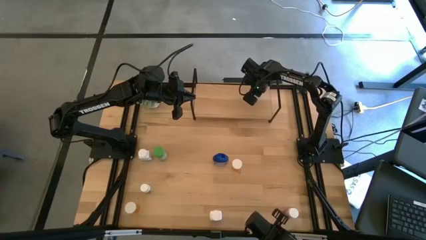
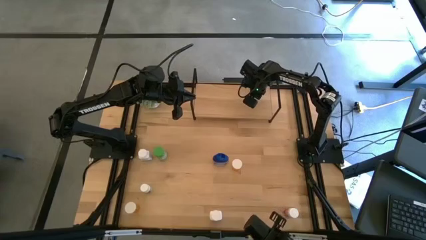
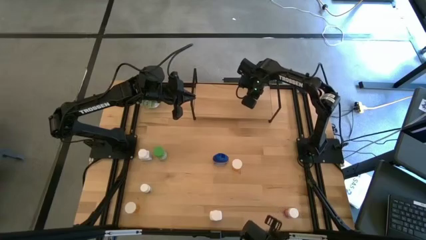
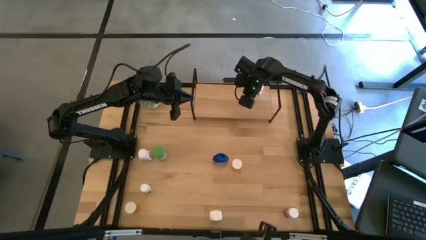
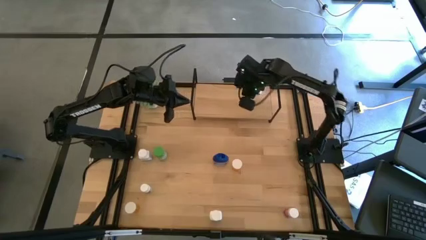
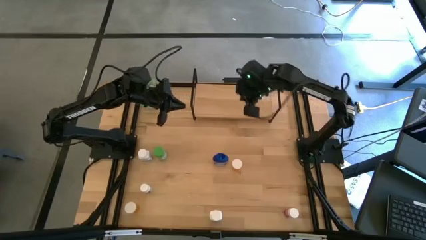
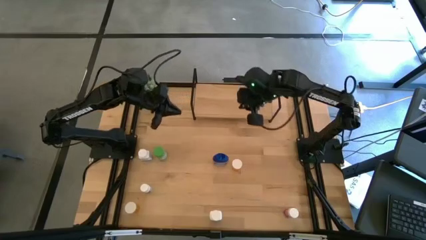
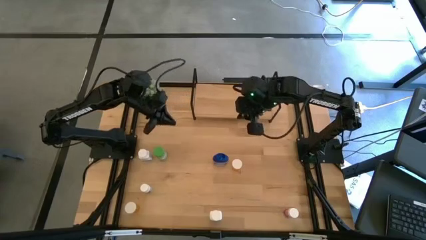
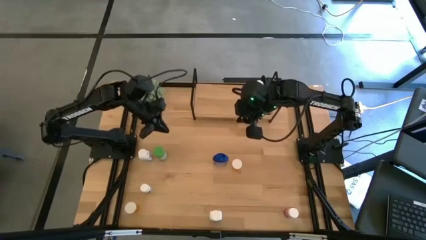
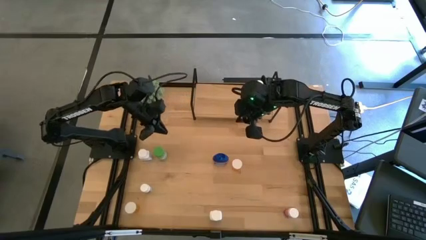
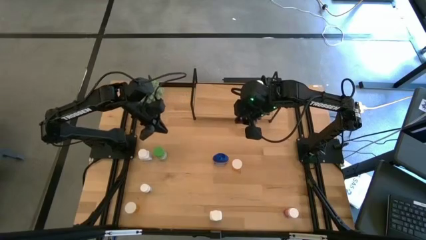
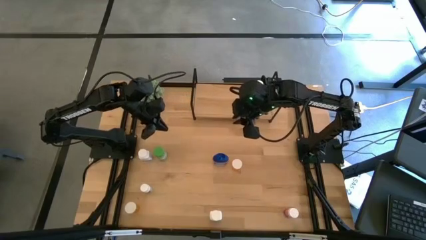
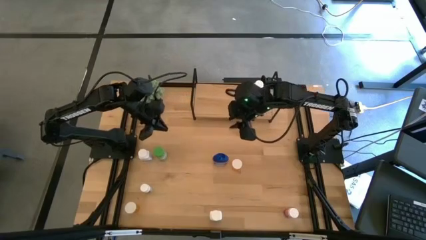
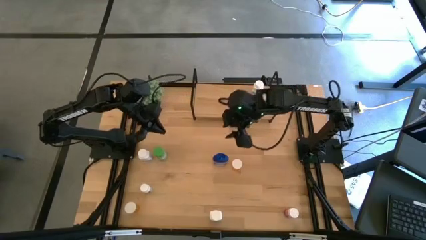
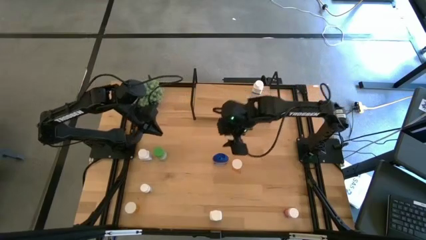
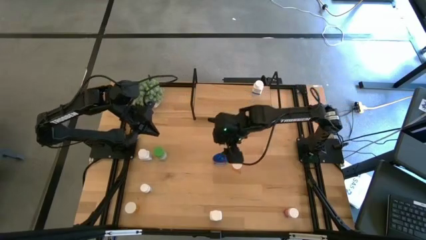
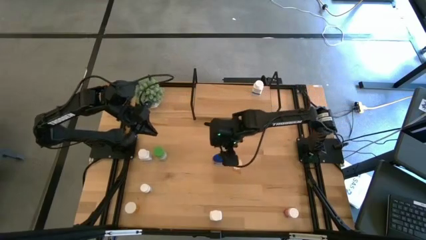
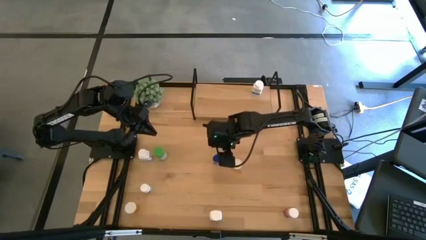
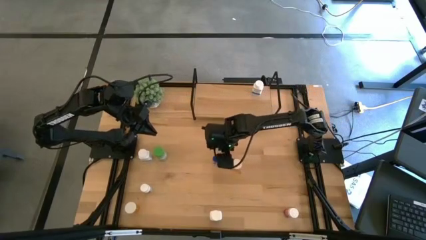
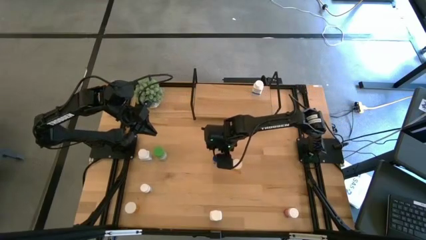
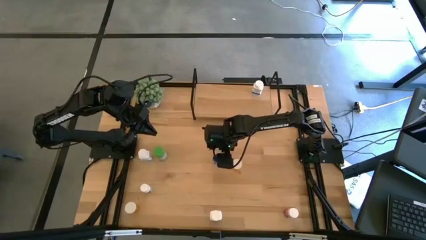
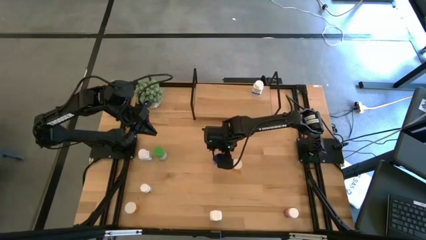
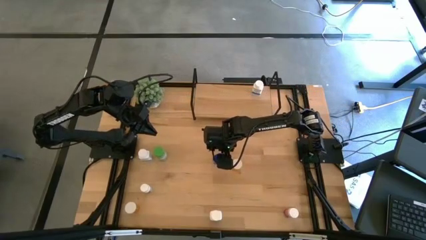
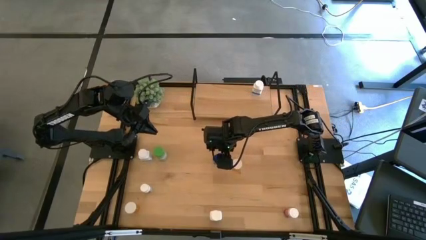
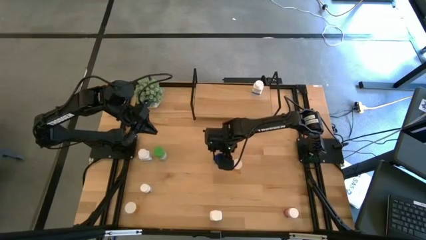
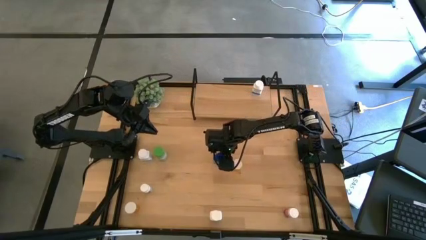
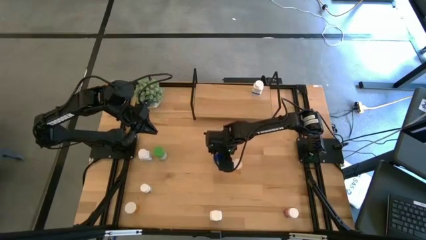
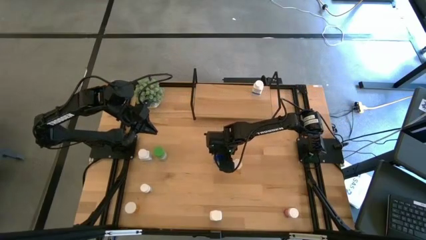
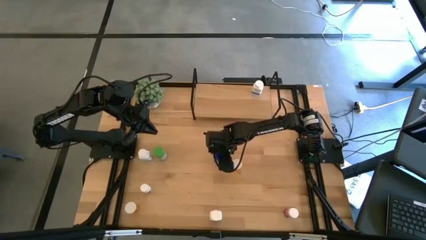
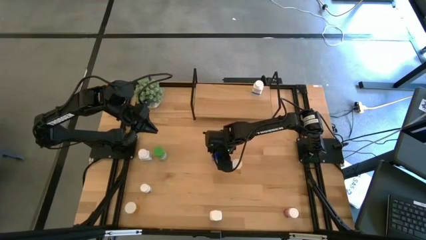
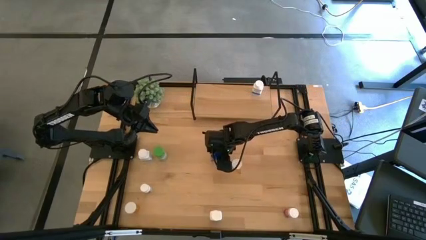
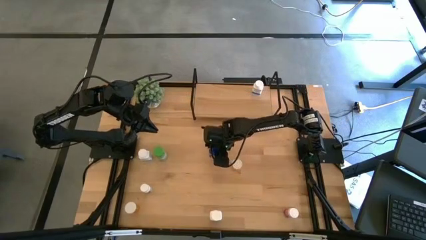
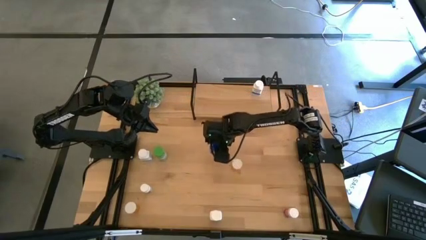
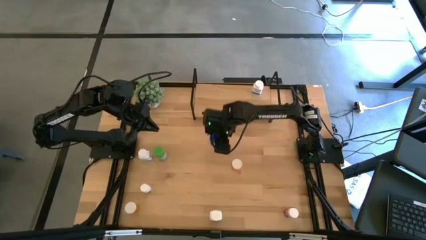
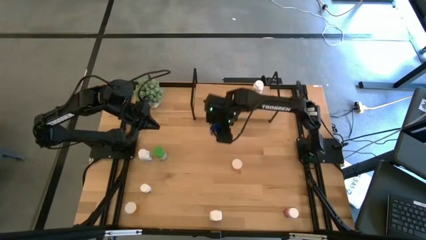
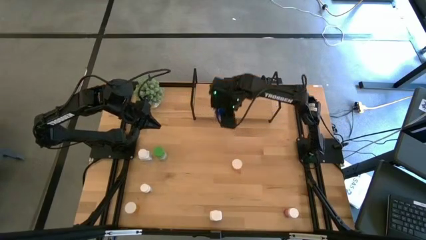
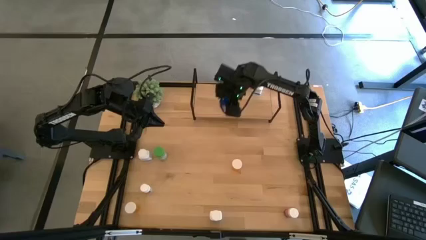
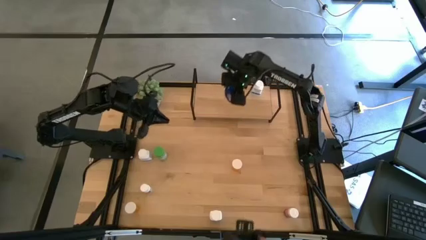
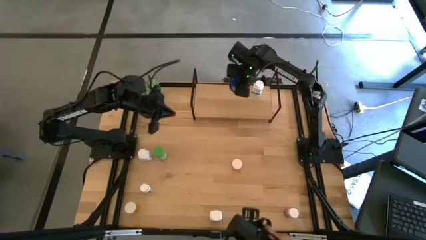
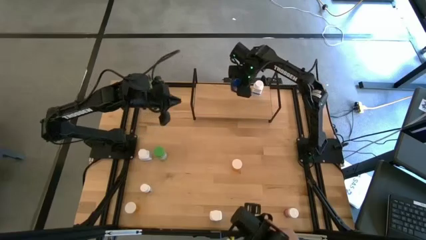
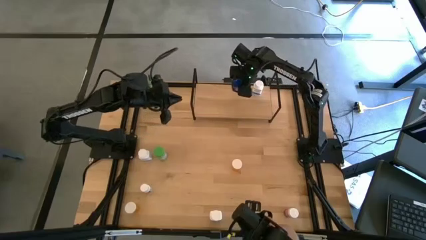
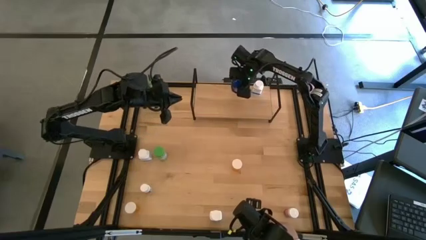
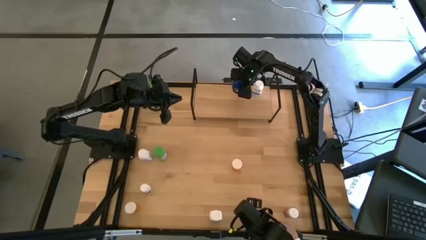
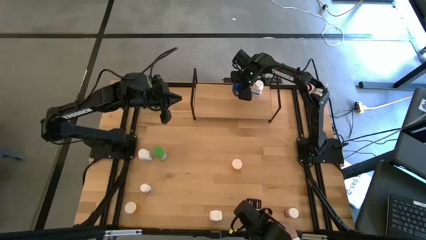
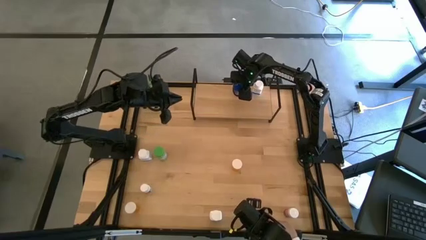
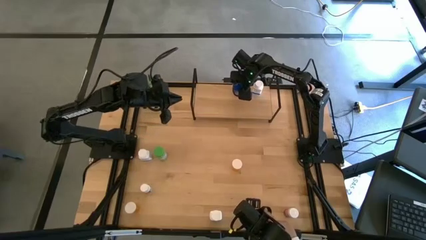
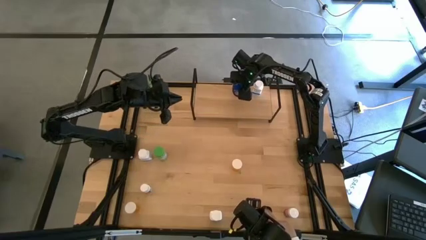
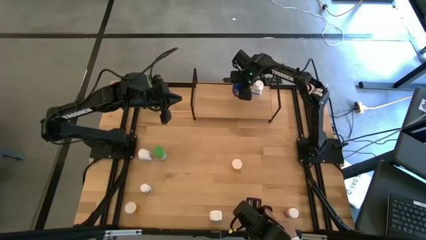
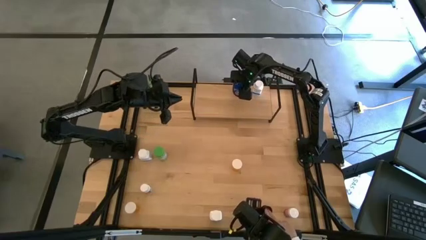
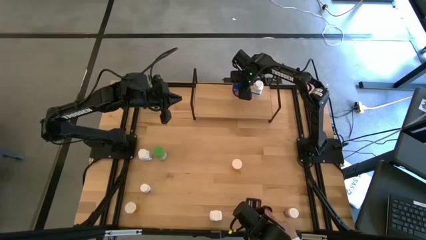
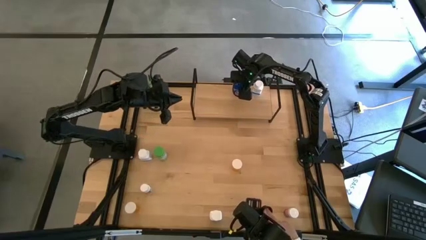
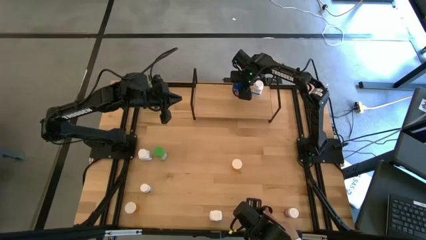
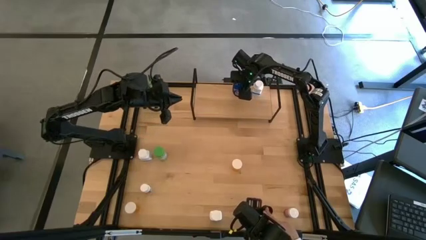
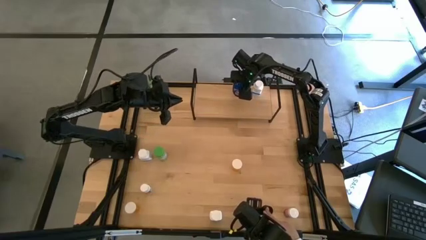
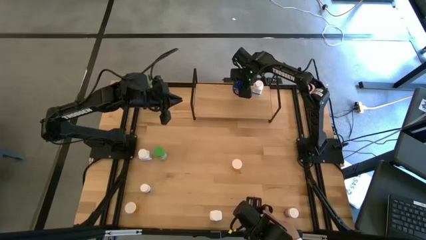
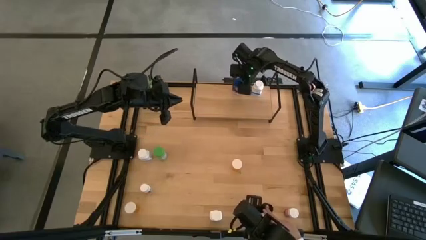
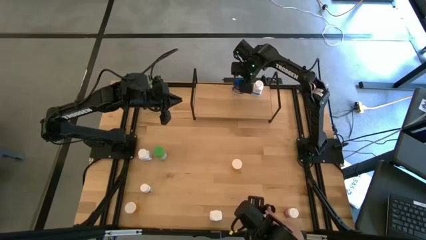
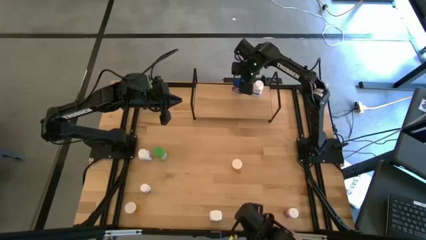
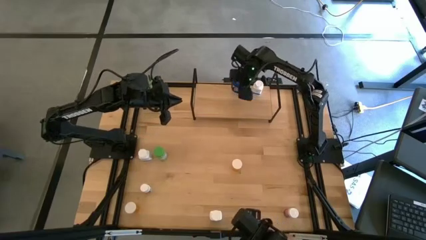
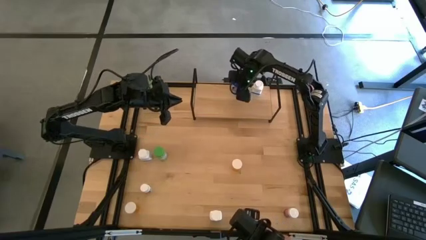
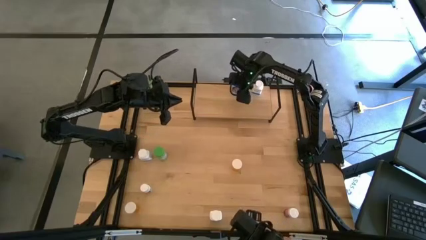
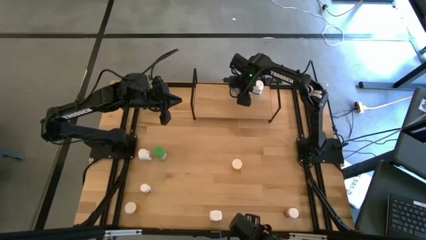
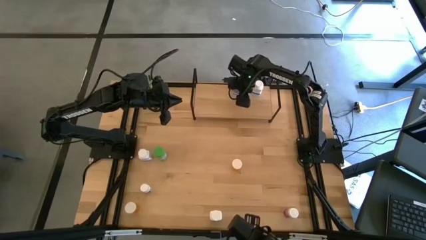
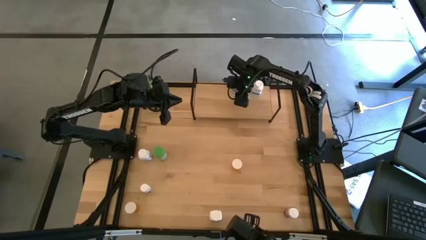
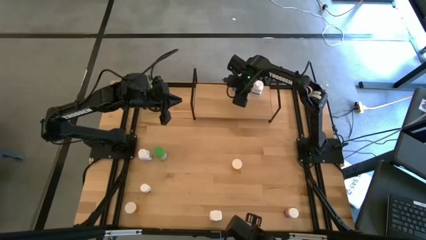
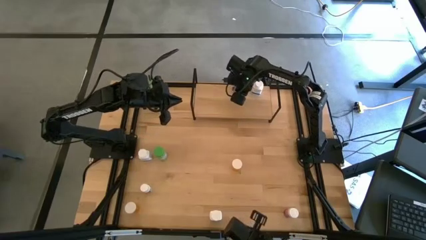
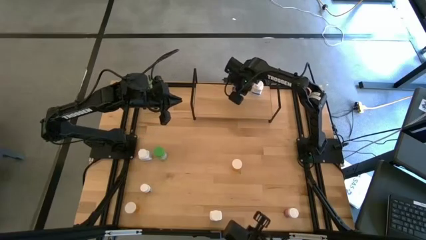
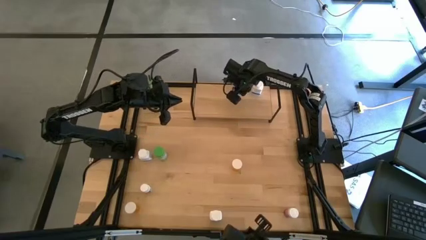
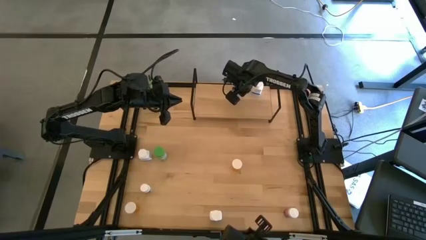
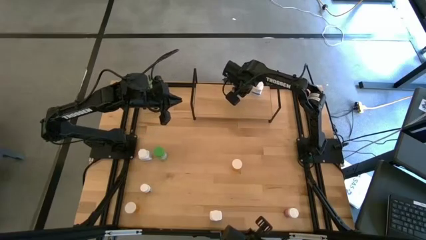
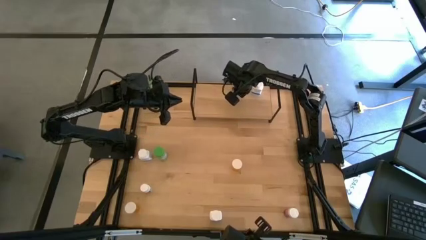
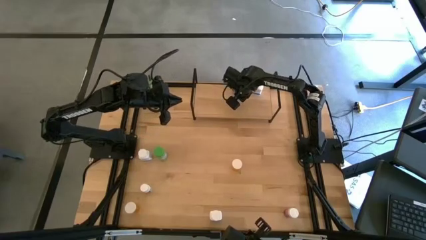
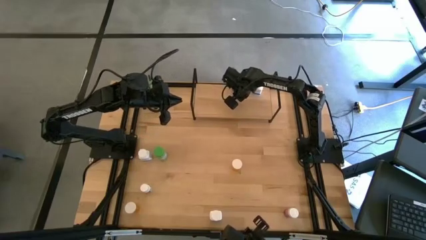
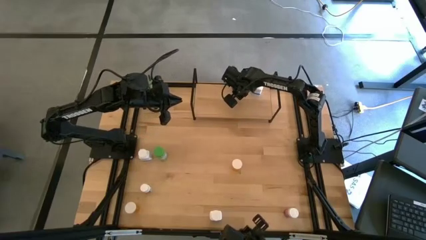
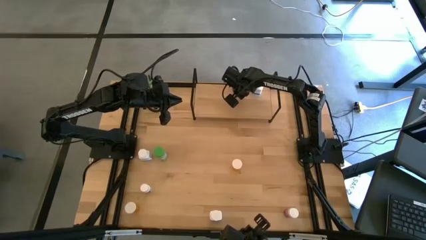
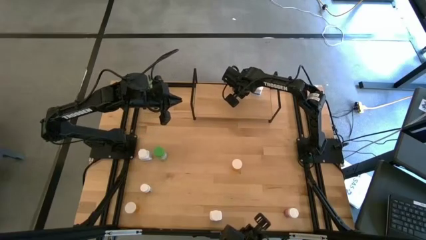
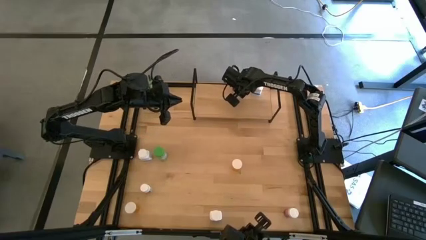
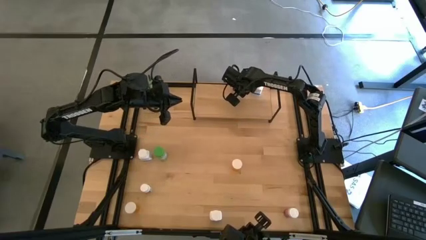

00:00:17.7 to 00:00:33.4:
Task: Pick and place medicine bottles onto shelf by color
Put the blue medicine bottle on the shelf
